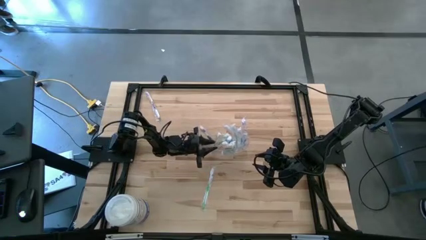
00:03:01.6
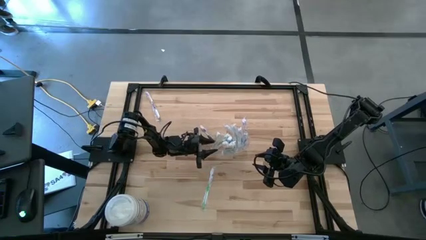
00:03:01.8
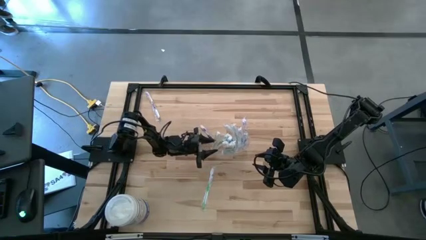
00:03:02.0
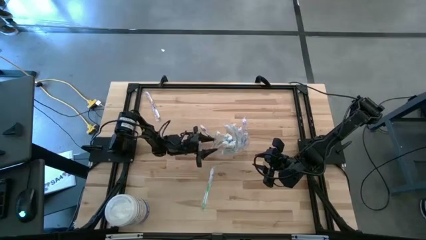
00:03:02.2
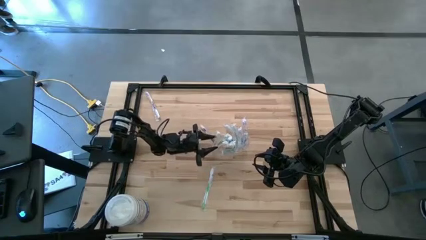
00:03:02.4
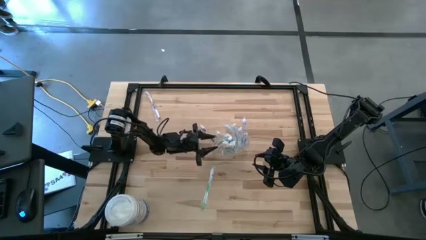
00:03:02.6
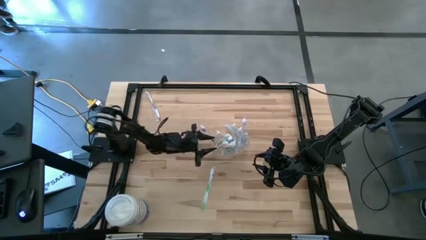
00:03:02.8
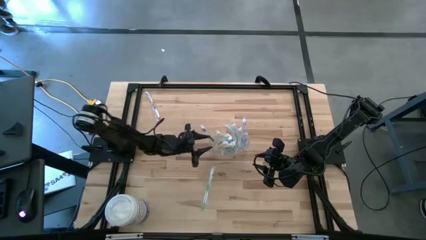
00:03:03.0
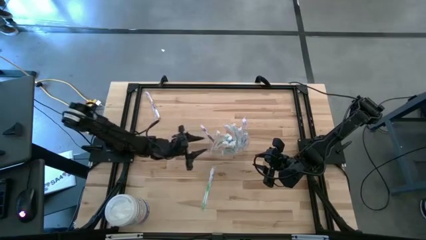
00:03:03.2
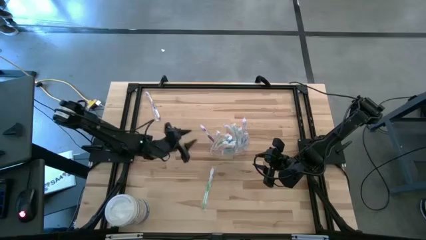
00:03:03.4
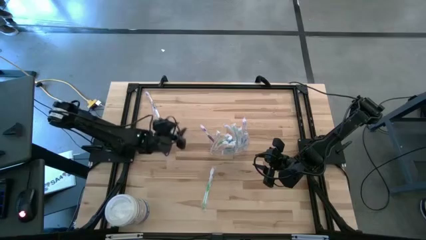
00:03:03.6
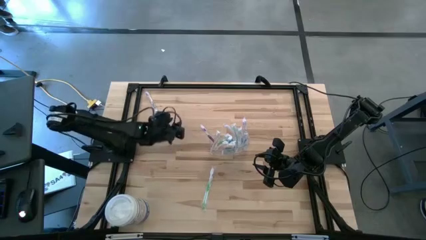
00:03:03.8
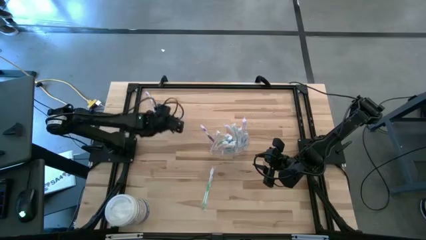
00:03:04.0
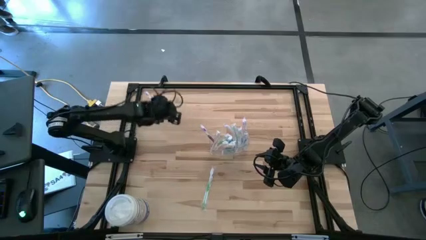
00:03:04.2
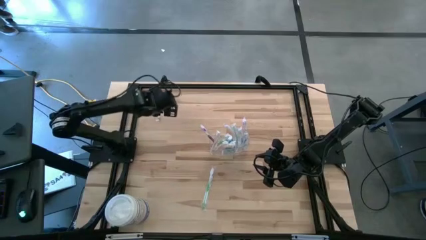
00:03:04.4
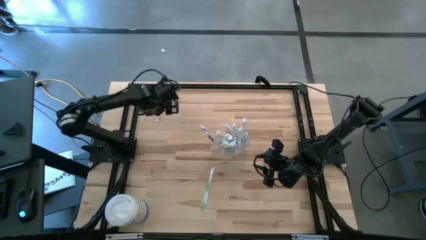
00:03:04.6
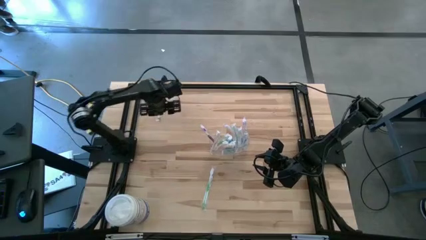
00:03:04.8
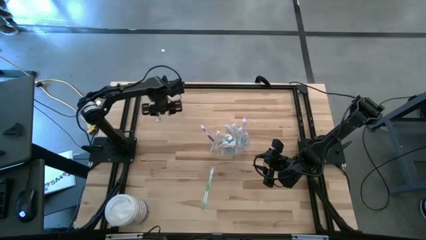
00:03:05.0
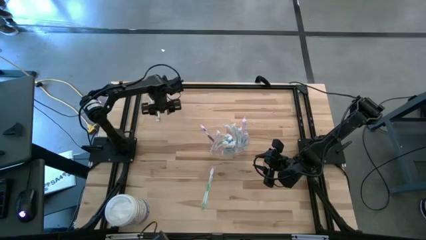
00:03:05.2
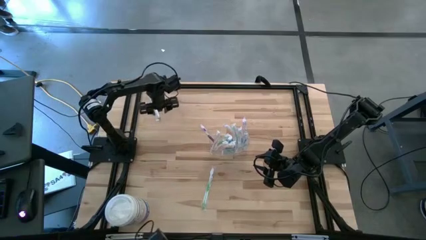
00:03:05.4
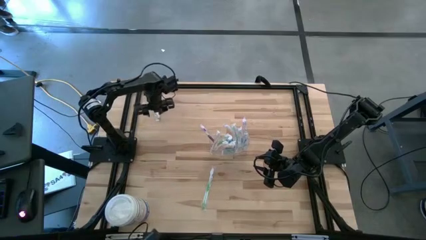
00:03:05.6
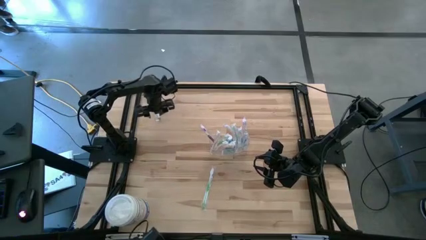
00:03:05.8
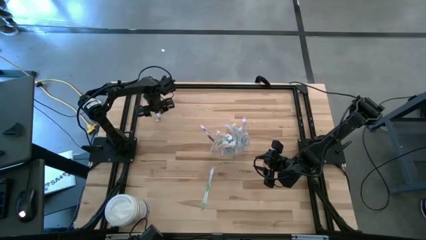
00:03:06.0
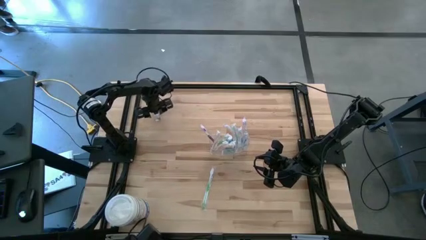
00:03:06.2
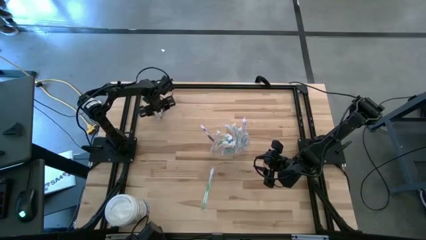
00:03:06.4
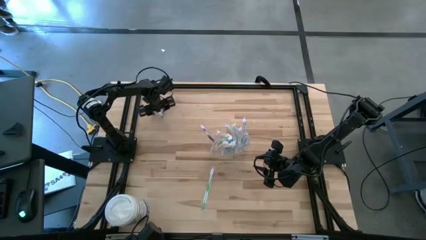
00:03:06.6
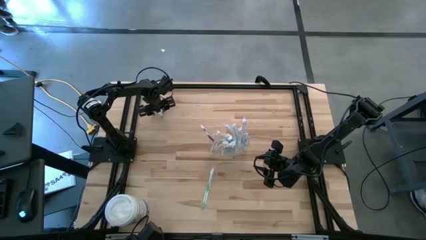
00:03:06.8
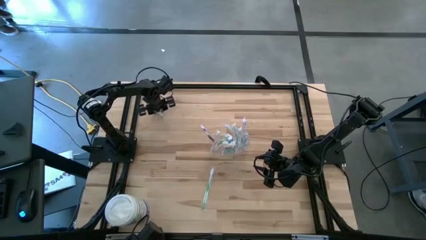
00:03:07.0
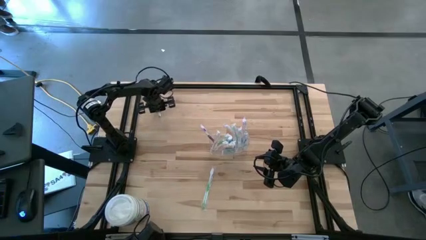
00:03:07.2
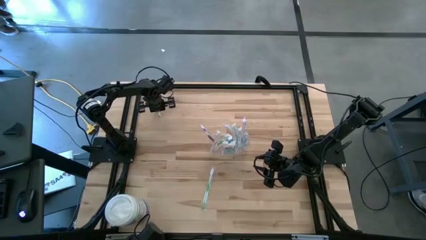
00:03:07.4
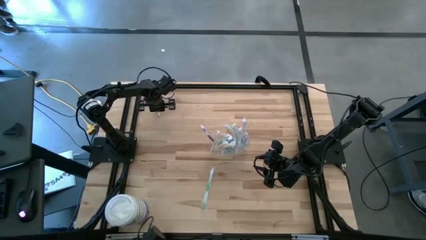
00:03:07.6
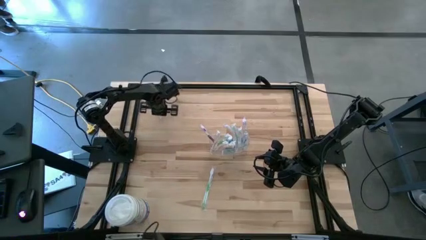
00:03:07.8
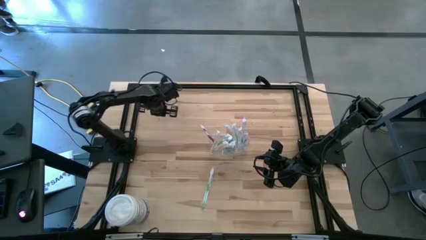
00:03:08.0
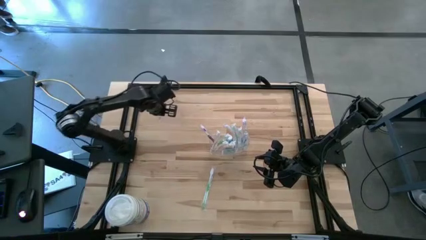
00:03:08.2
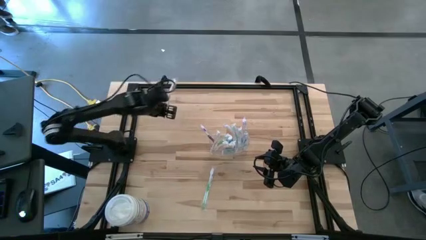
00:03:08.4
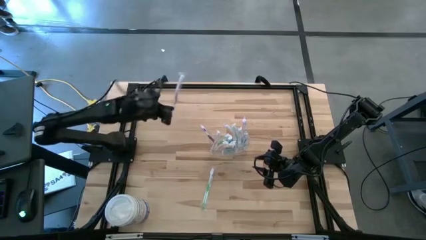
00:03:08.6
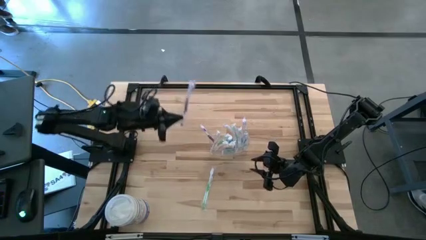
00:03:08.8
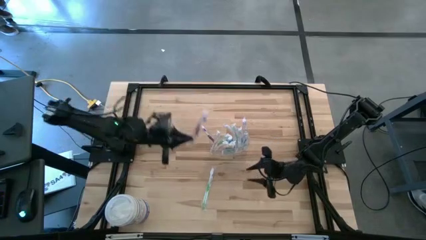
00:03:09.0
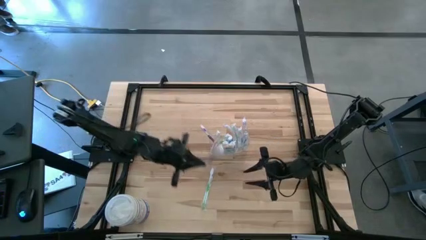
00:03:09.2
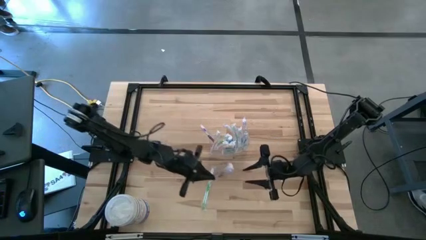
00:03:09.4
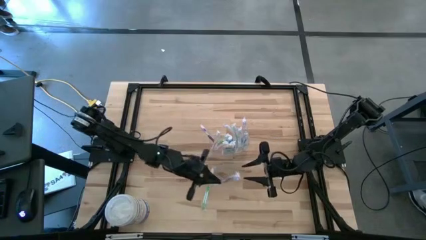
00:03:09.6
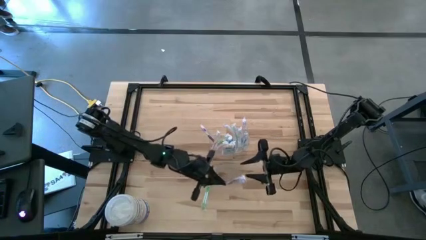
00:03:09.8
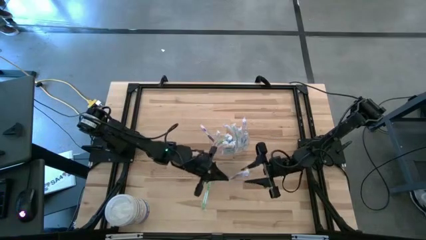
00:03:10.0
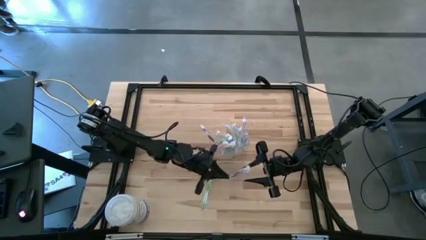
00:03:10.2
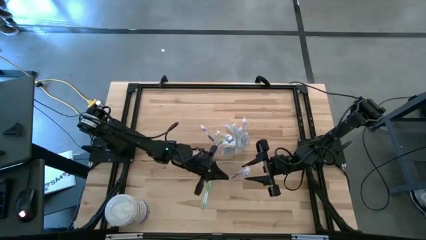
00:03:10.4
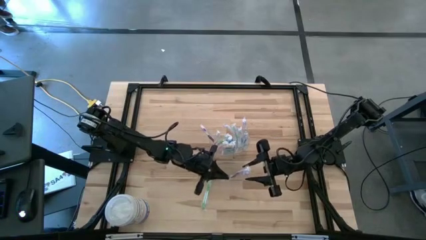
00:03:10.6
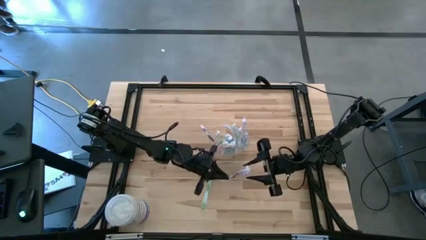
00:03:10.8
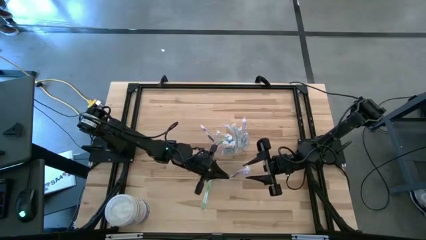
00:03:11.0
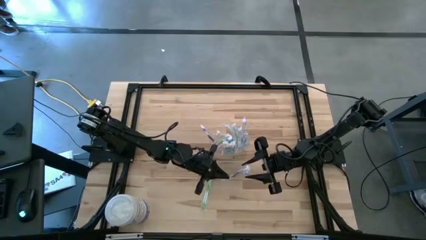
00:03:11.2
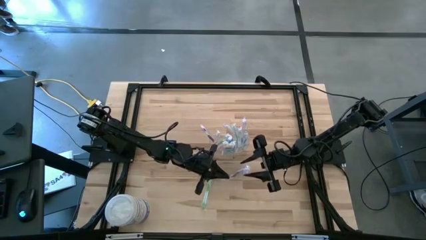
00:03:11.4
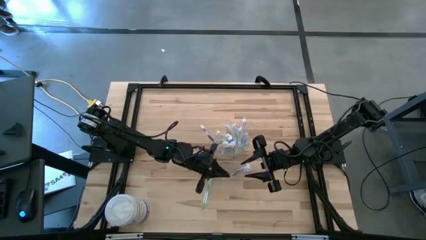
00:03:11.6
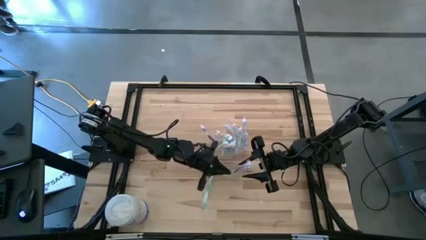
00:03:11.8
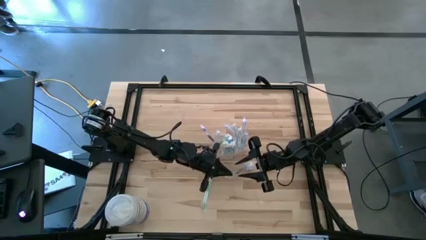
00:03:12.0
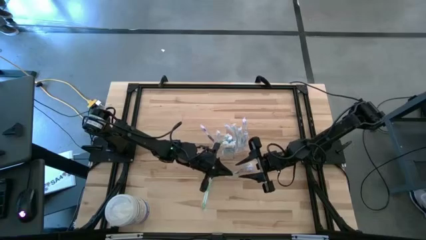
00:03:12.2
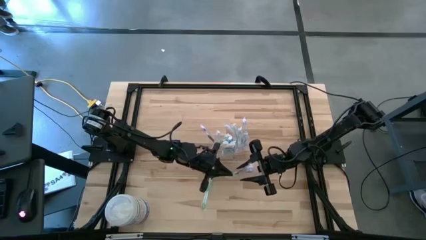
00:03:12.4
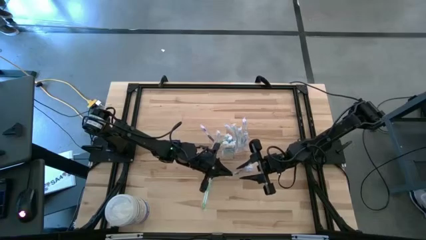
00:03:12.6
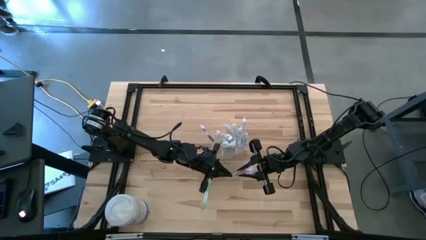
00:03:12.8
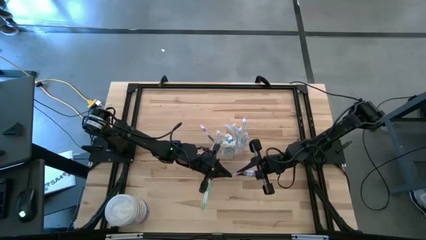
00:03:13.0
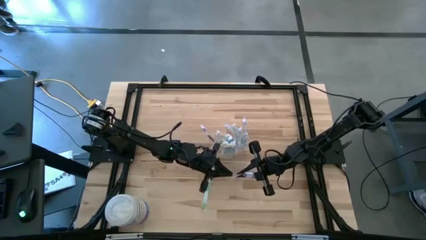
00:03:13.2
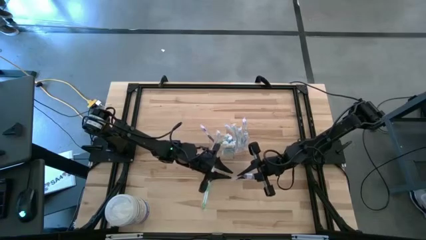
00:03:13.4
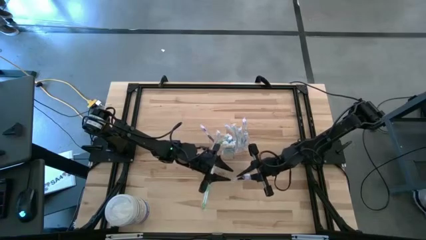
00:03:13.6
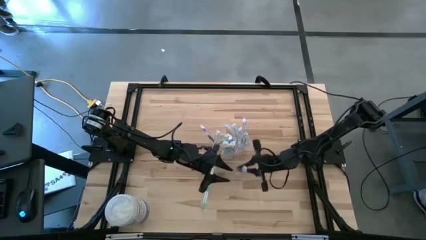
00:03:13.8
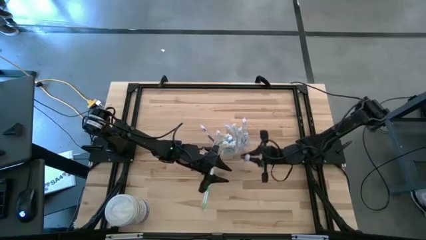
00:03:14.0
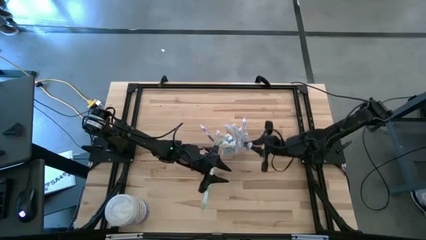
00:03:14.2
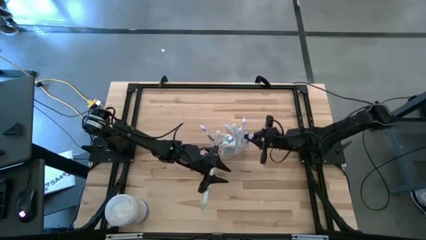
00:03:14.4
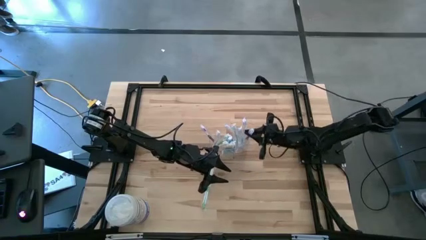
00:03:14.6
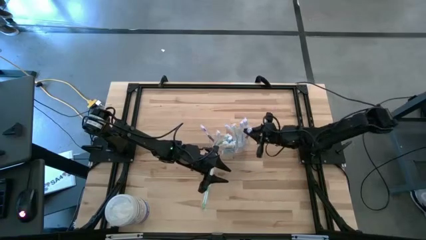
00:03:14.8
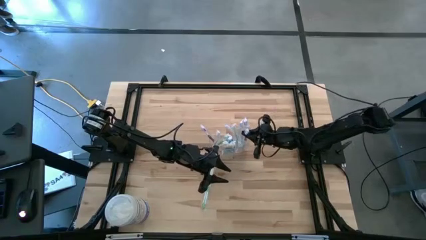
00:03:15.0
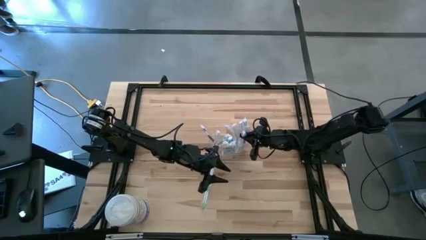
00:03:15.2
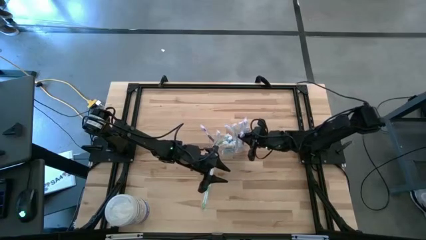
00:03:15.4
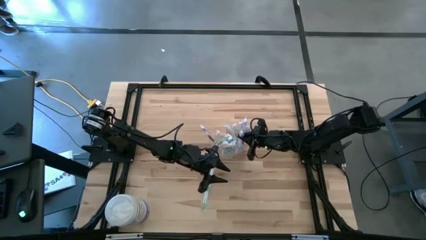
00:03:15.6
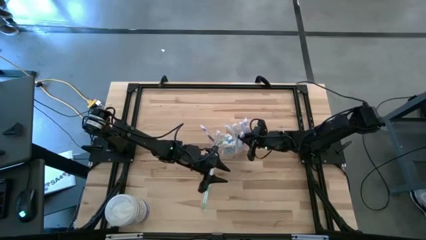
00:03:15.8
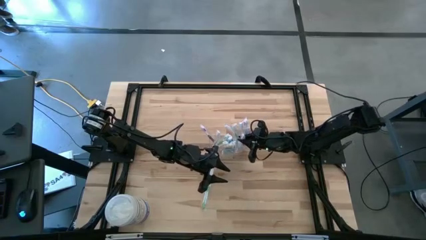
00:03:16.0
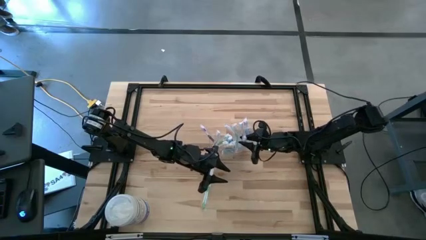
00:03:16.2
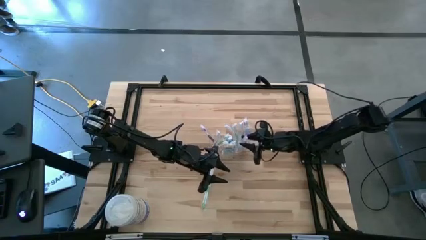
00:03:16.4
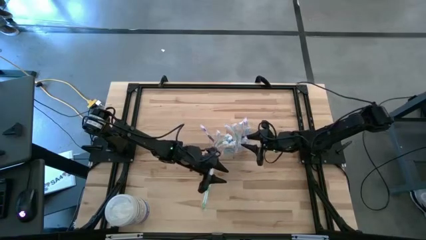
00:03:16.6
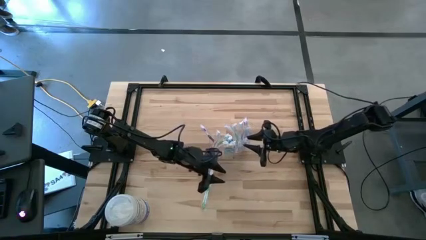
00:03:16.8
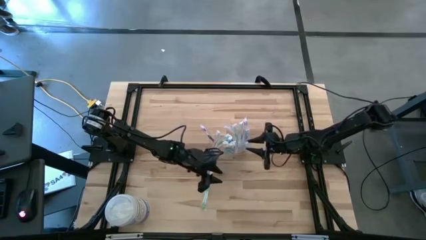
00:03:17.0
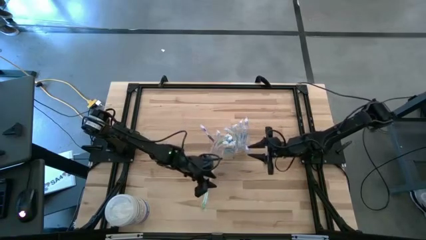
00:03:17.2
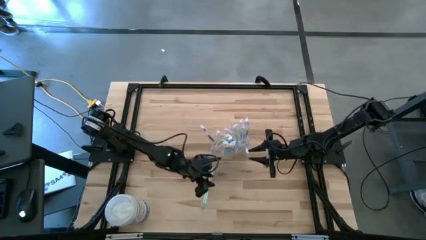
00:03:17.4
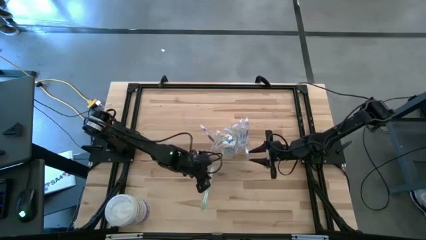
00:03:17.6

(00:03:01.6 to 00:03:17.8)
Task: Pick & Place toothbrushing station
Put the violet toothbrush into the wire organizer
